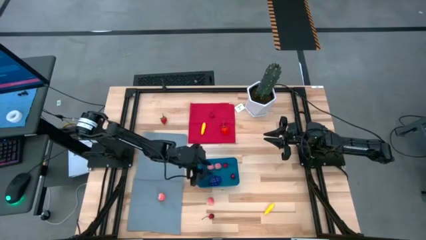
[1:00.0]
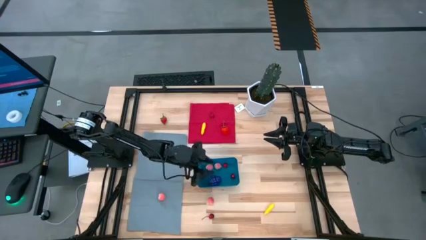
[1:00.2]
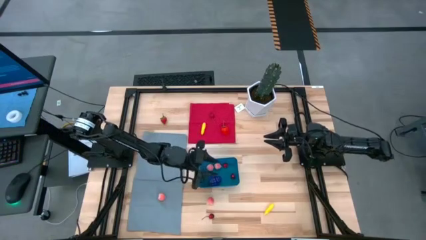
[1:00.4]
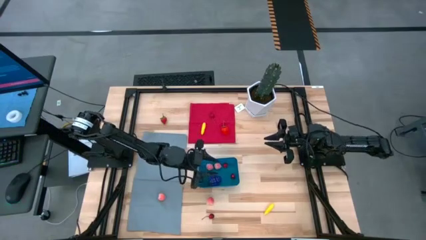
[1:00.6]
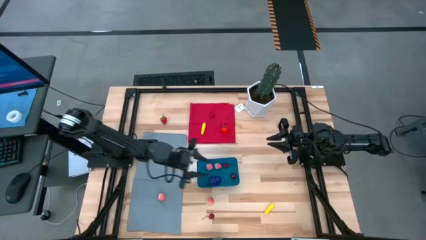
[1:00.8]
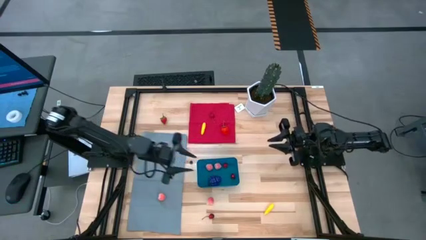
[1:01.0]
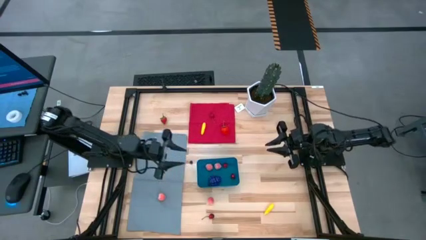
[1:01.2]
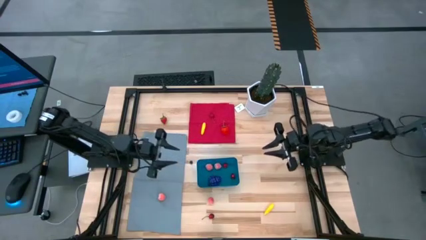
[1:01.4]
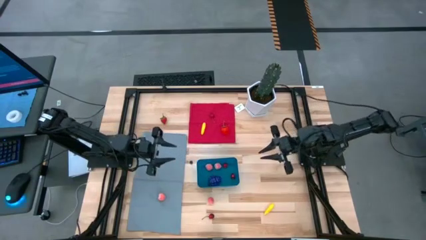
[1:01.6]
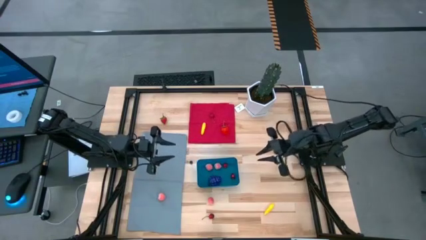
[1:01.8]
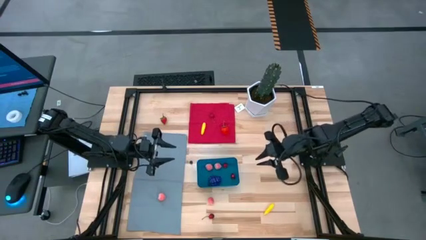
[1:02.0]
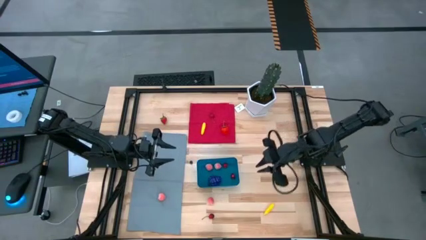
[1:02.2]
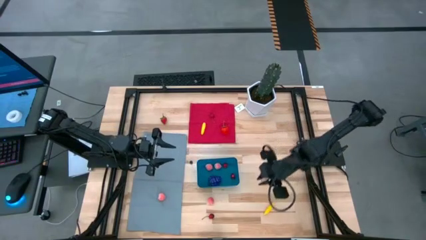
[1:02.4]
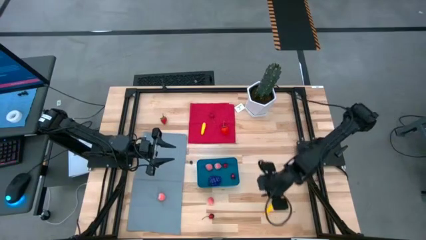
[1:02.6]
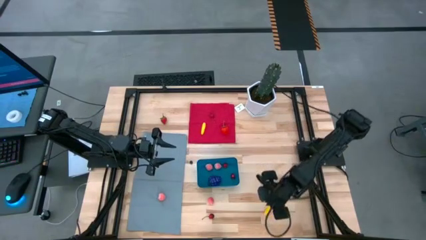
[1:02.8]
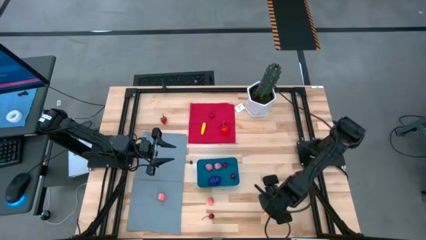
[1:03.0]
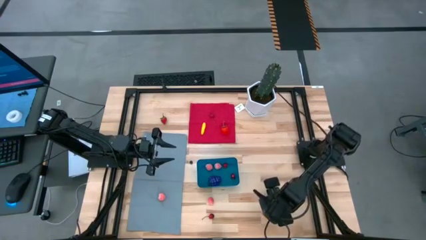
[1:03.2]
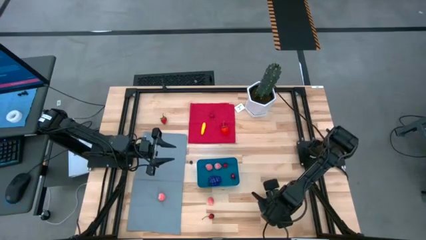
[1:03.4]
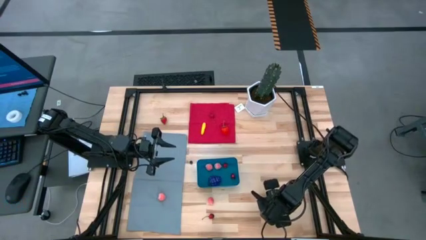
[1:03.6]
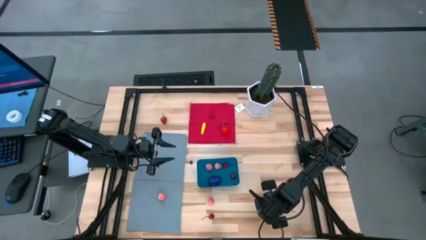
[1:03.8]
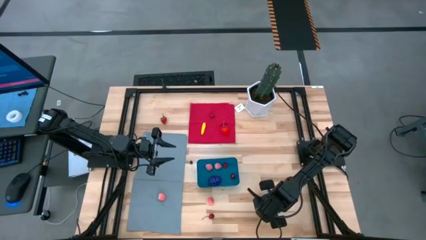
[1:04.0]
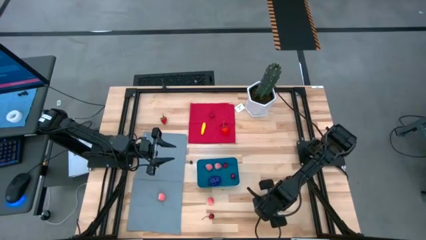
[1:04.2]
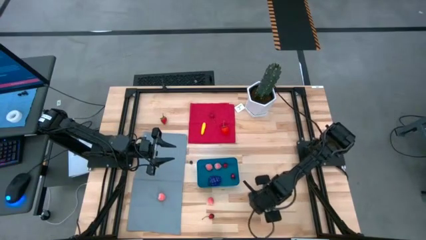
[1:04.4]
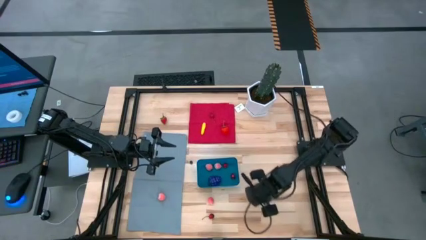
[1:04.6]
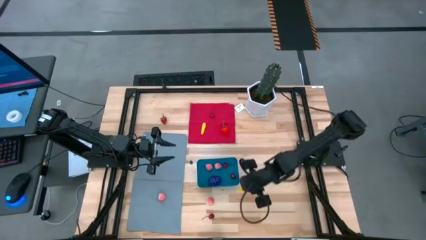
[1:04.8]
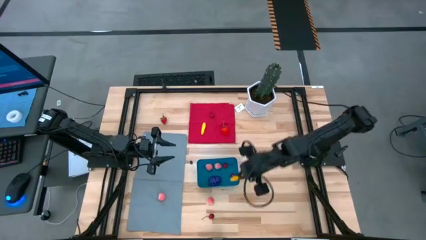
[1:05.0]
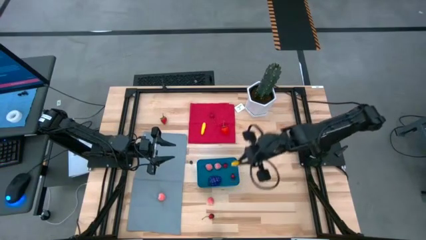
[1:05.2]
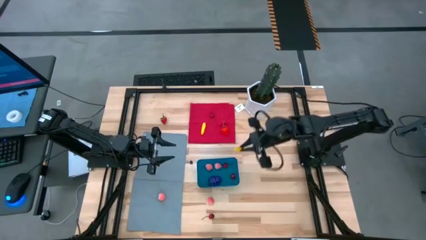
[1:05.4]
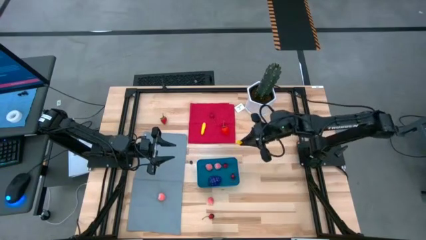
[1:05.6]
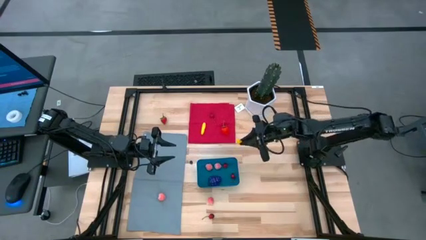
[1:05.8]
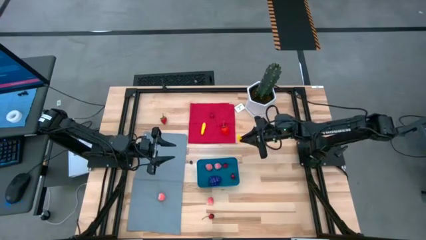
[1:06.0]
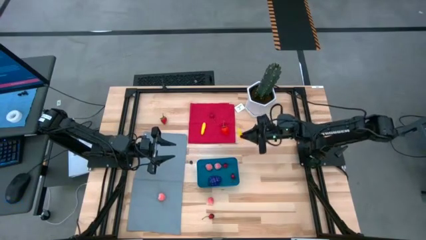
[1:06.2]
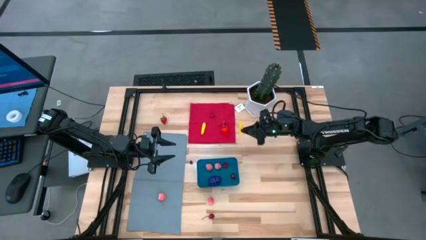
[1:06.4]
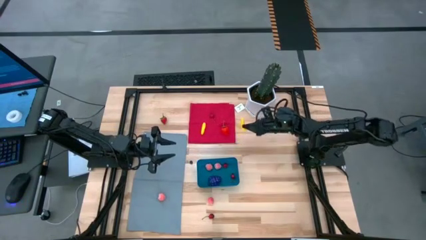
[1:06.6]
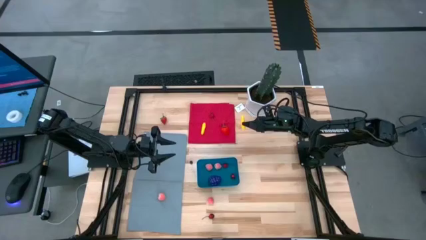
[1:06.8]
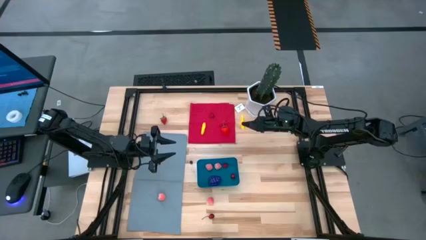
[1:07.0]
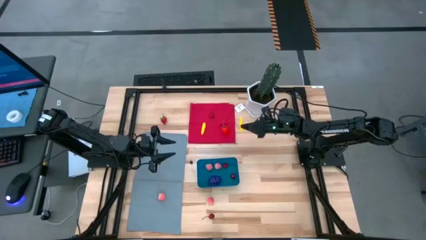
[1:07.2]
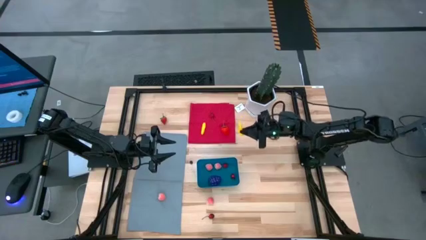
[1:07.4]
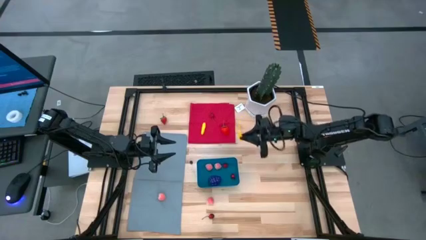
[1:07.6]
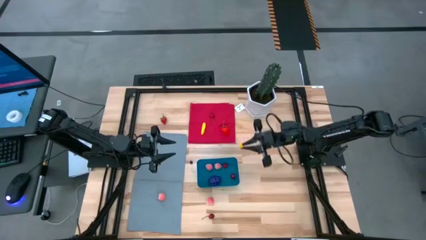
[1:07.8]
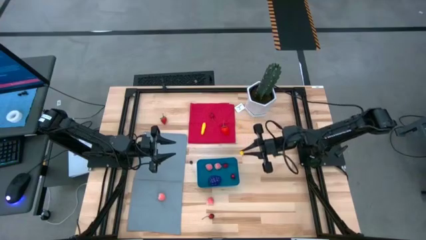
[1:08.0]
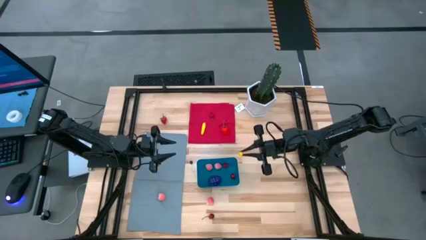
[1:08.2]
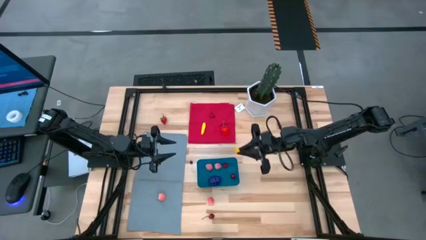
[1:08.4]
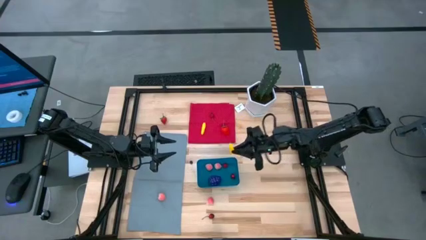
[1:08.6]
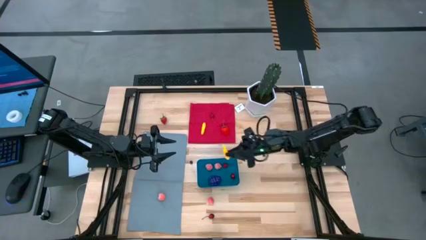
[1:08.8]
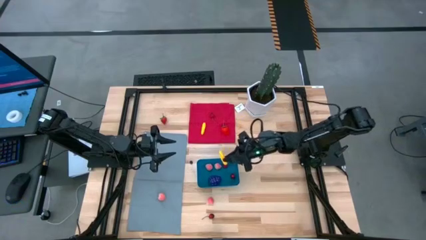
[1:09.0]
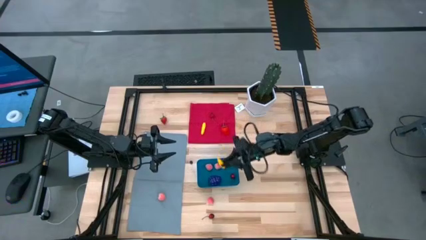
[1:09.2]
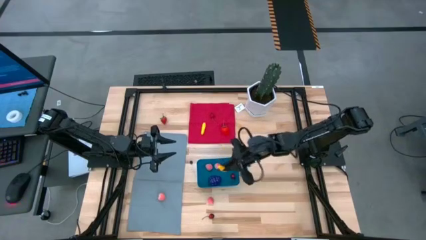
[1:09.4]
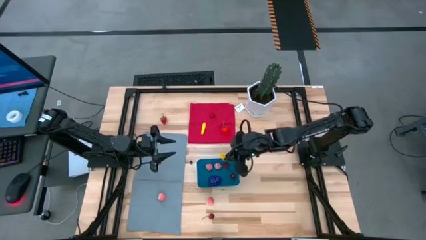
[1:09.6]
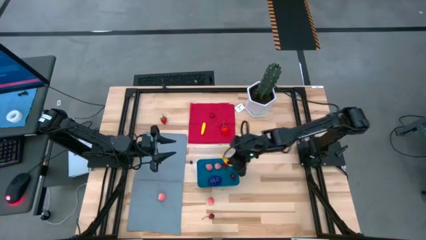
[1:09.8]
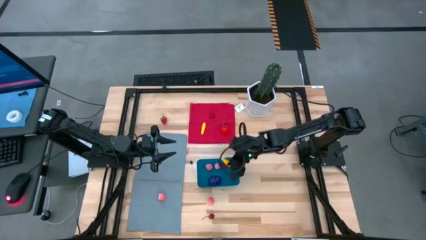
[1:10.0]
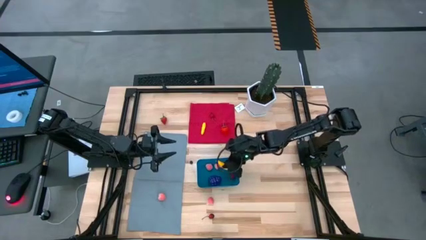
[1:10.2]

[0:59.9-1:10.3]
Task: Pick and placing Produce into tupperware
Put the corn into the blue bin
